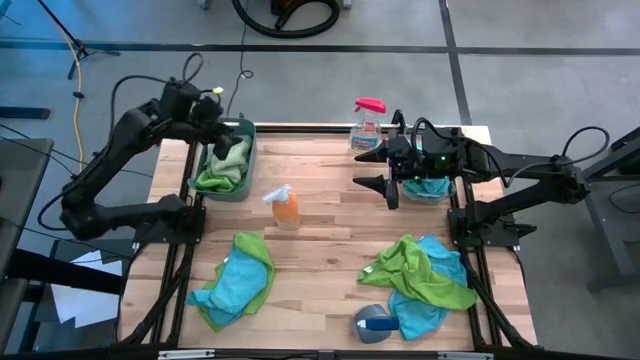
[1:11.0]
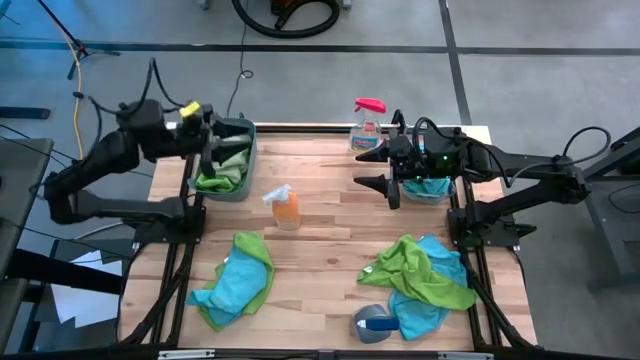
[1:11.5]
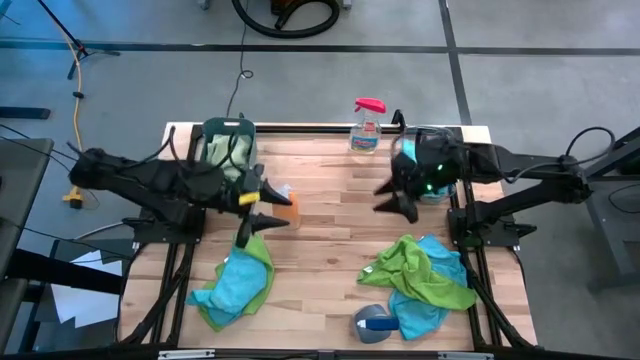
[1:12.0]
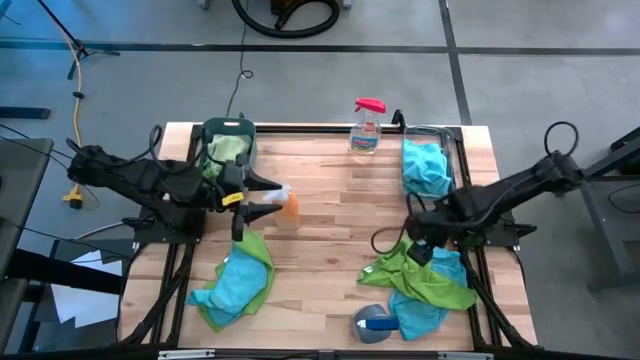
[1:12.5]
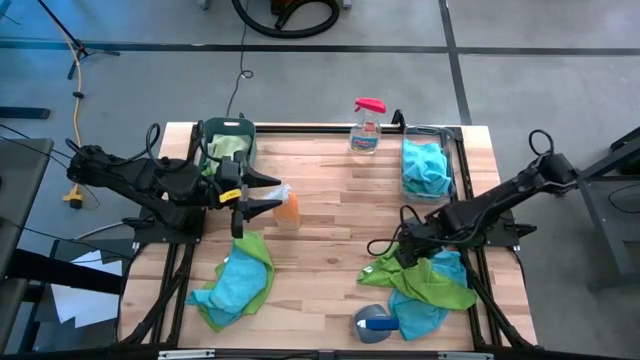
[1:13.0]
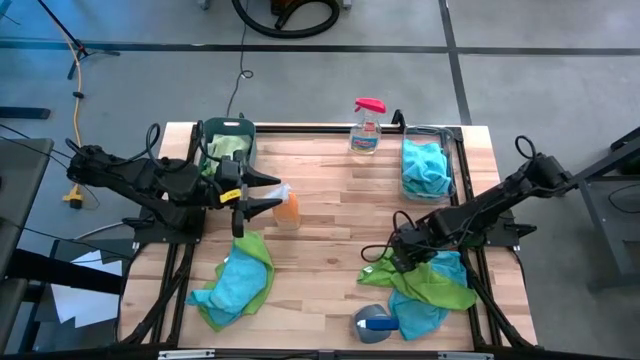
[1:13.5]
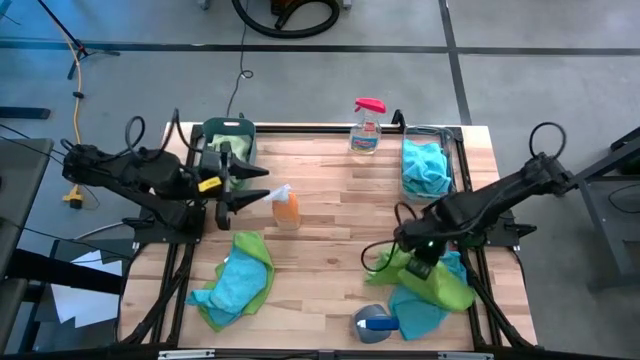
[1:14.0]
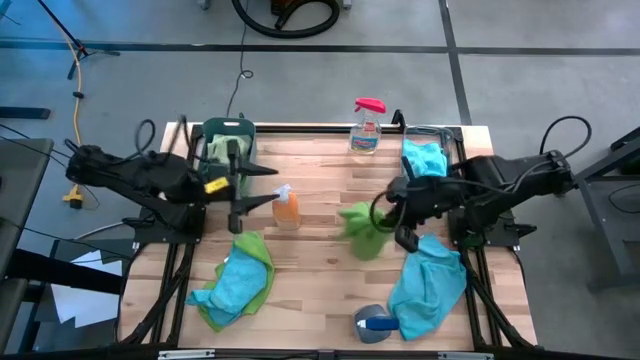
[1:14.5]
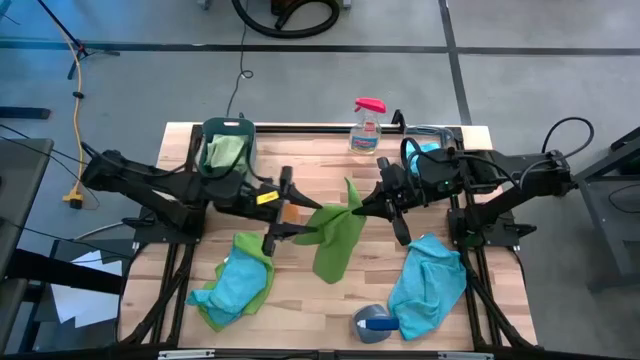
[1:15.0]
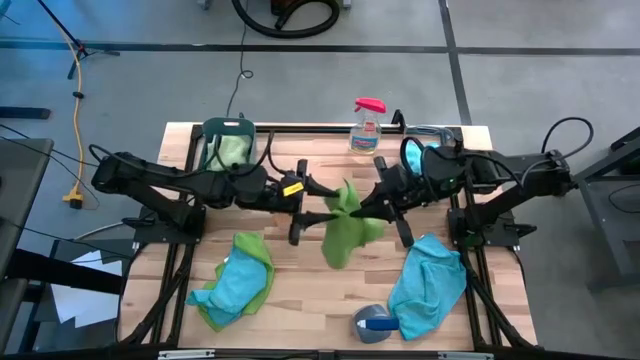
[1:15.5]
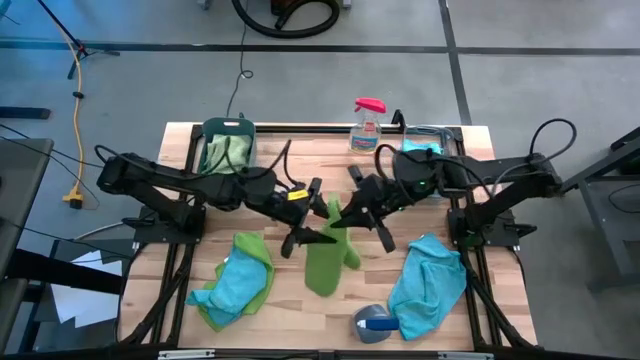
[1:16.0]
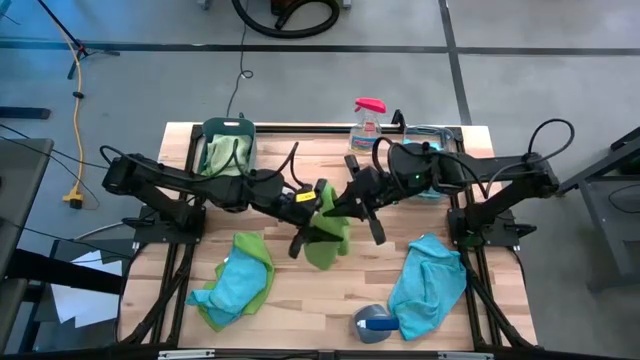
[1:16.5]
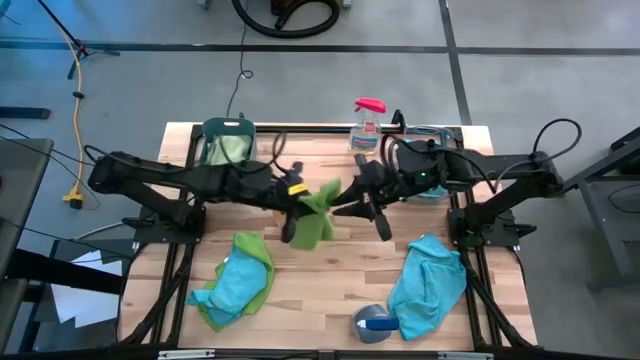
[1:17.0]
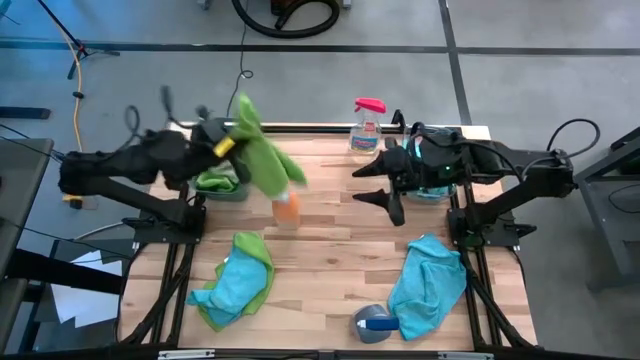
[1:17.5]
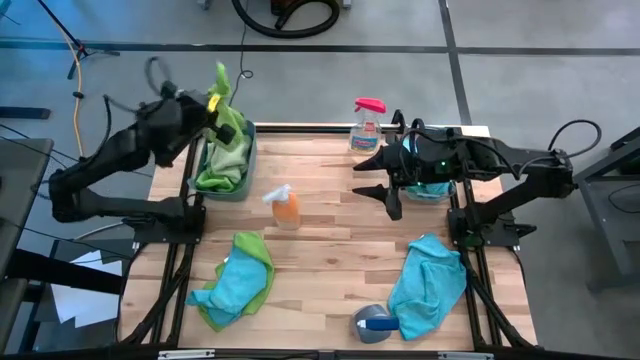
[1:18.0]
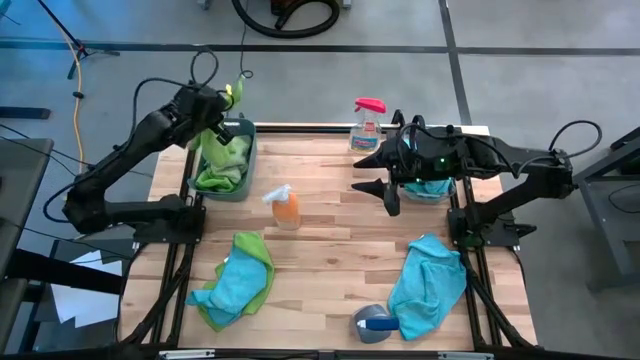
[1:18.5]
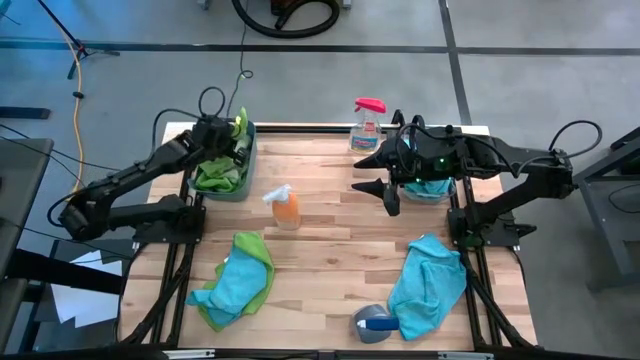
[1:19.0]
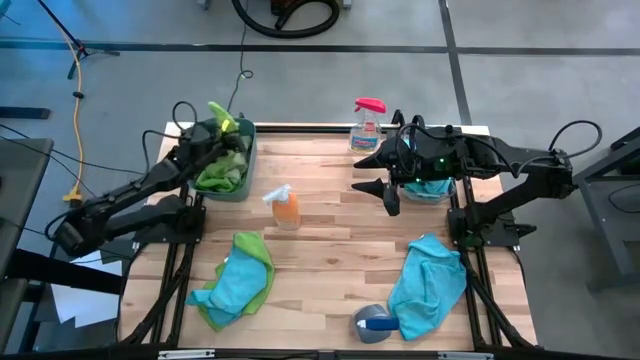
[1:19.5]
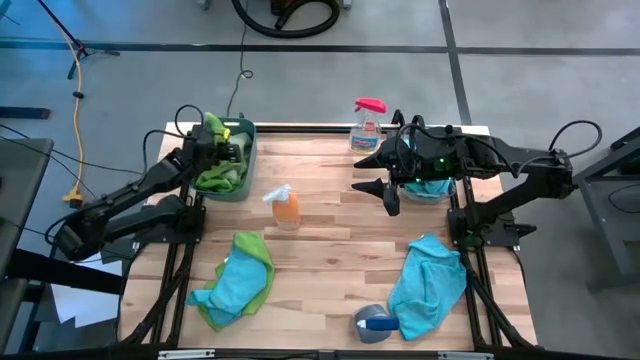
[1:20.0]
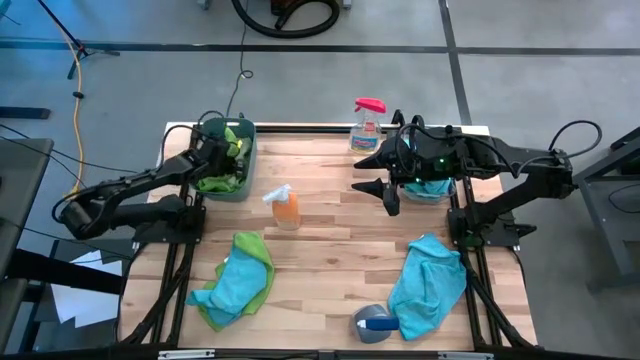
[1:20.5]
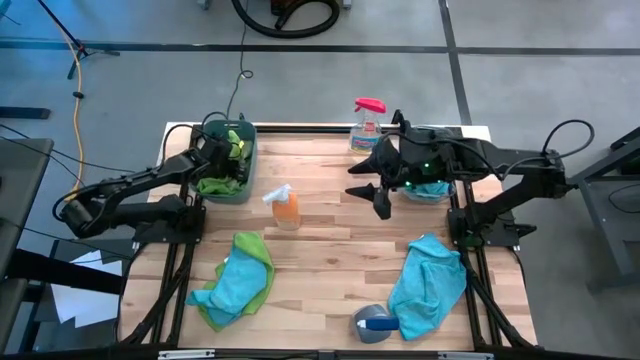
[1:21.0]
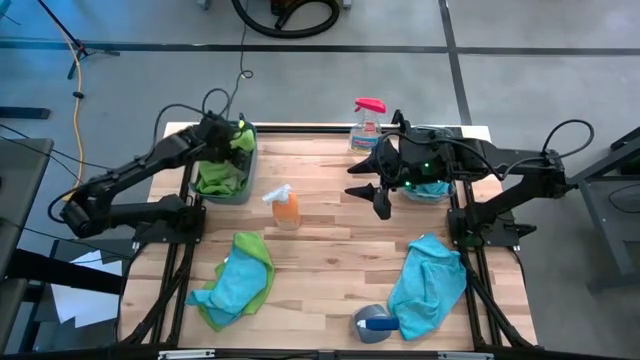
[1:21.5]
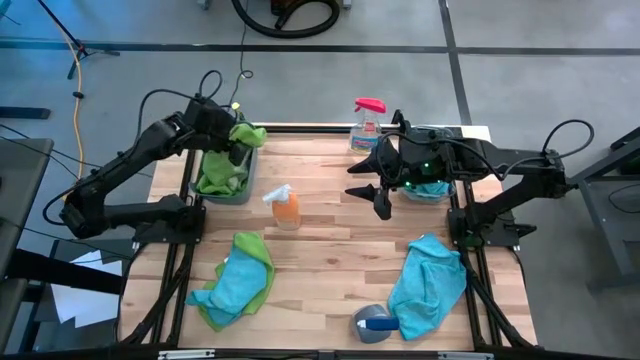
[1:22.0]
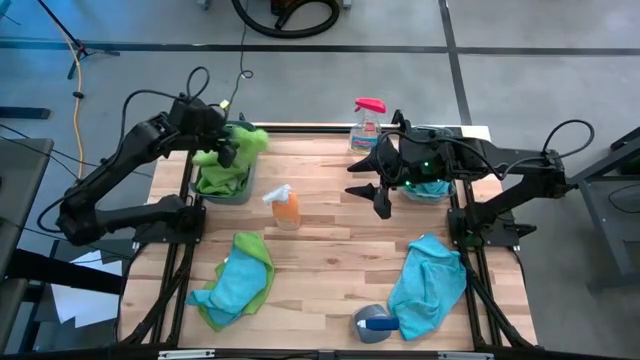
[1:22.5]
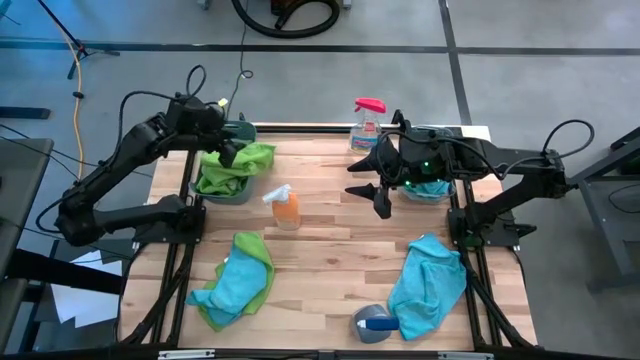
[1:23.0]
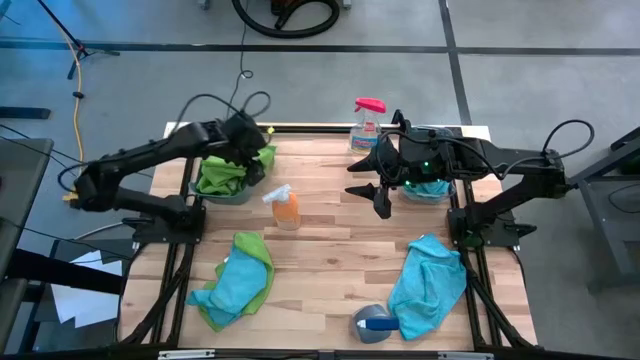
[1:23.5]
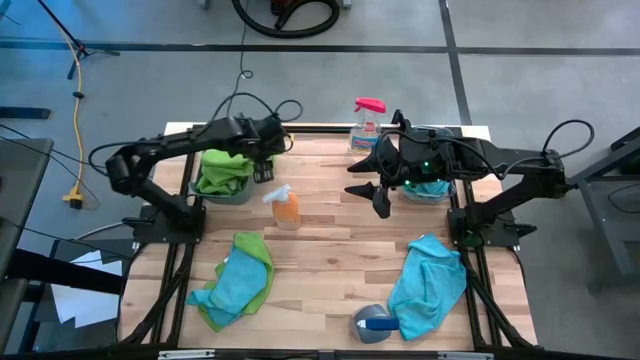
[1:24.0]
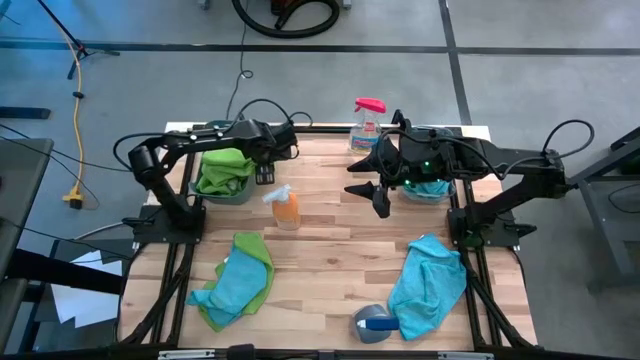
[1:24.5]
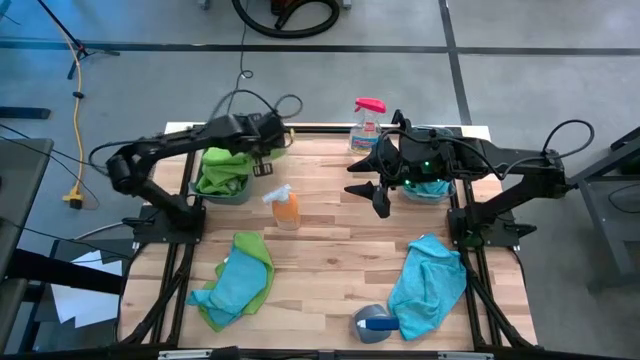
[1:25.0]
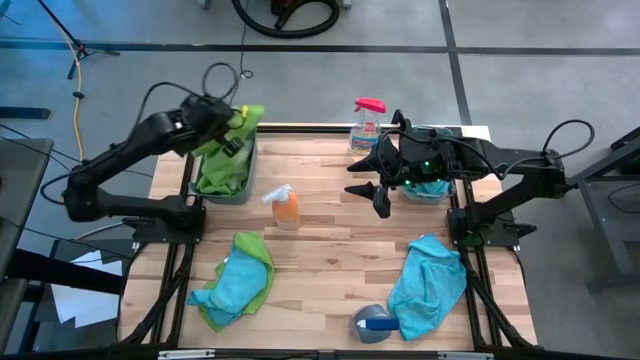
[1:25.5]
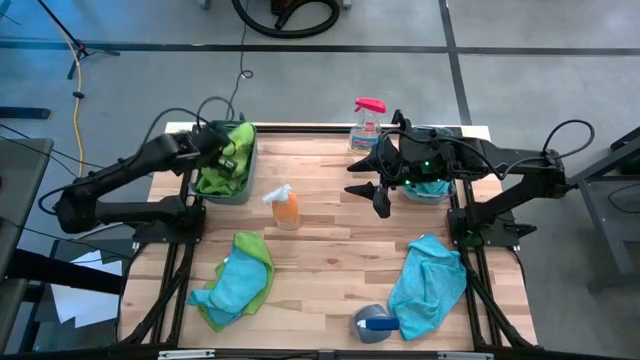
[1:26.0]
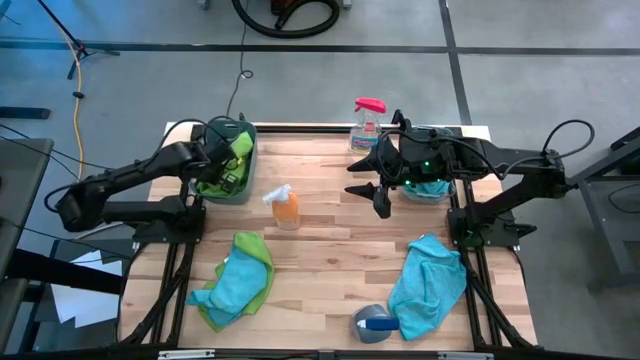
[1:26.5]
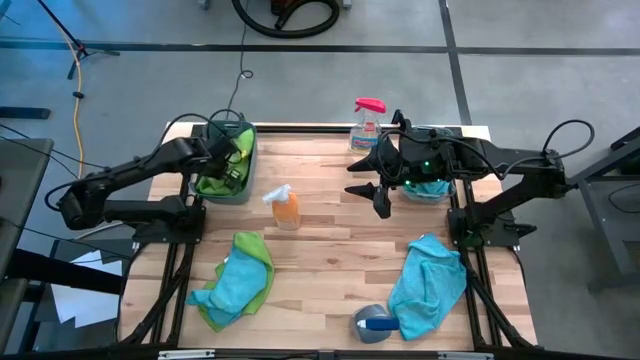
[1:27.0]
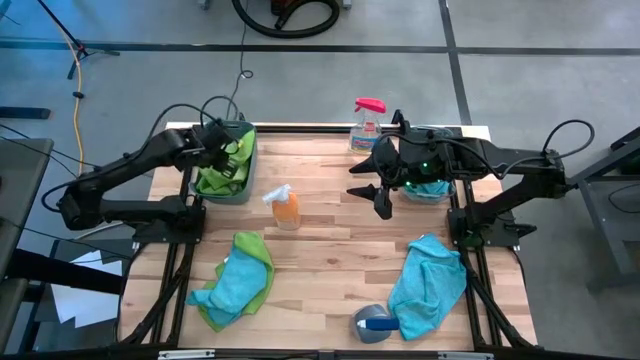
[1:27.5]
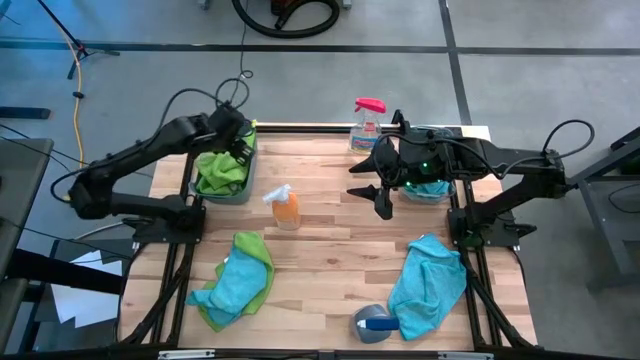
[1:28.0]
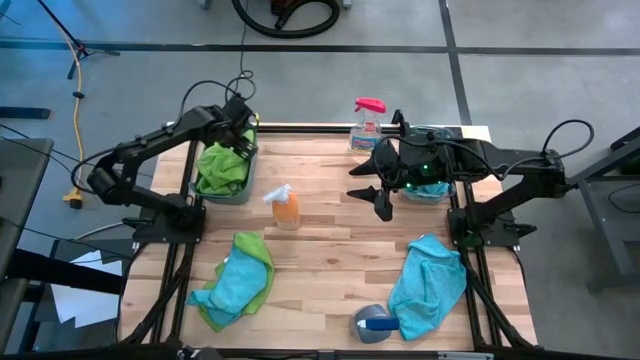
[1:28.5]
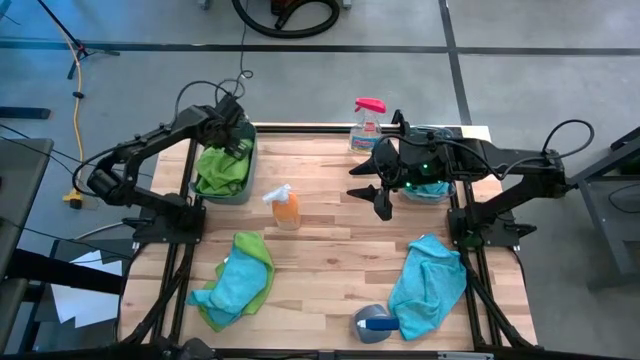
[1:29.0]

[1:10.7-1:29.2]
Task: Sort microfiber towel by color & place in baskets
Put the green microfiber towel into the green bin

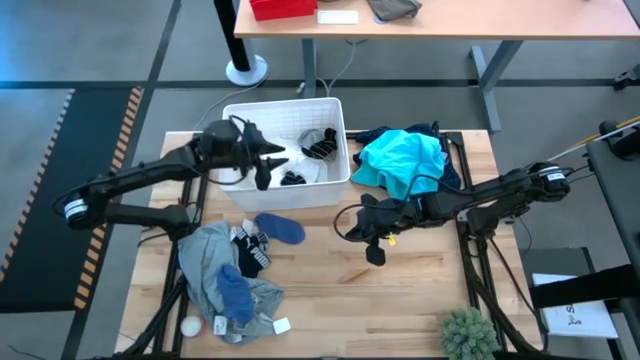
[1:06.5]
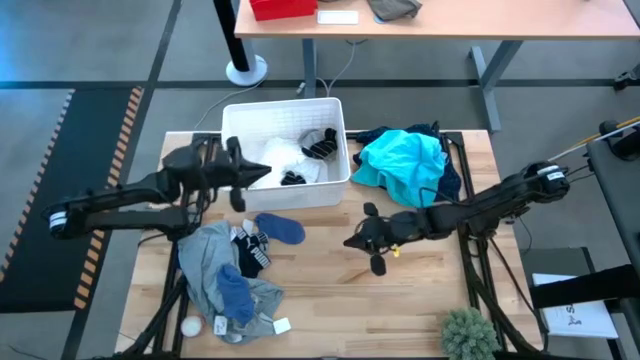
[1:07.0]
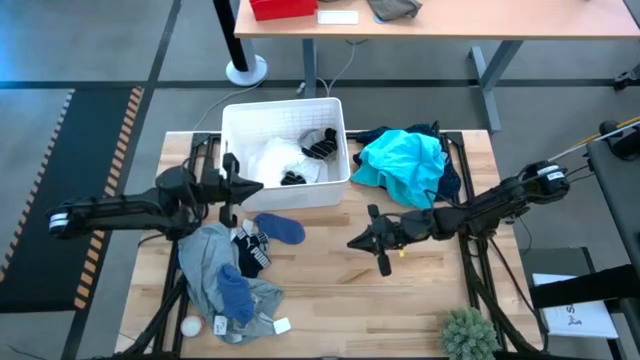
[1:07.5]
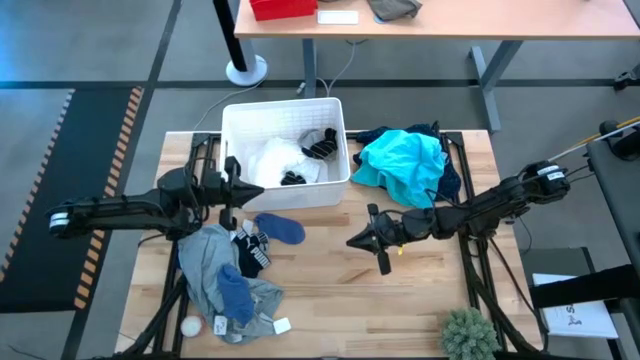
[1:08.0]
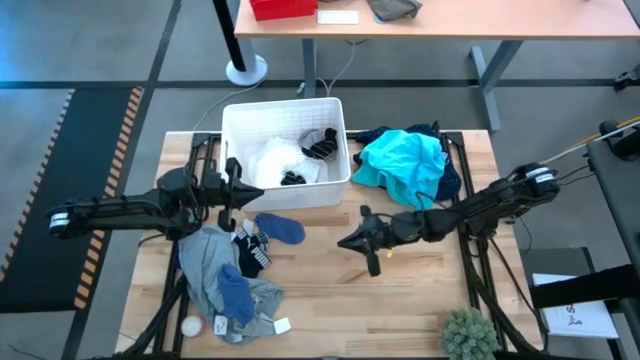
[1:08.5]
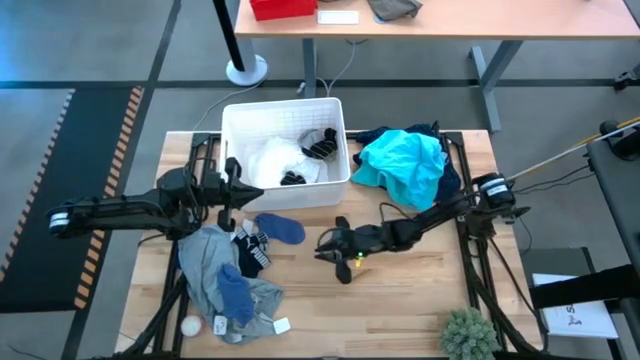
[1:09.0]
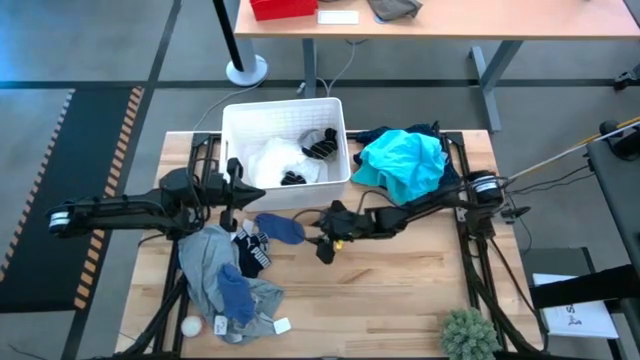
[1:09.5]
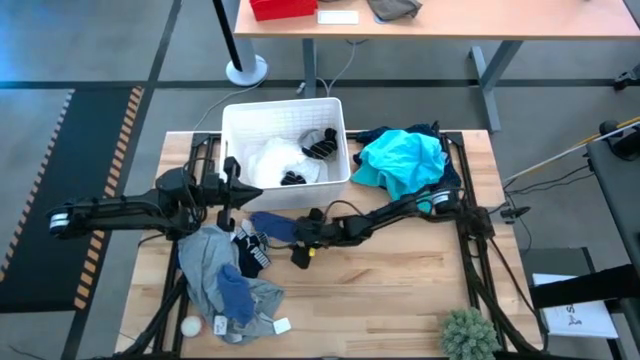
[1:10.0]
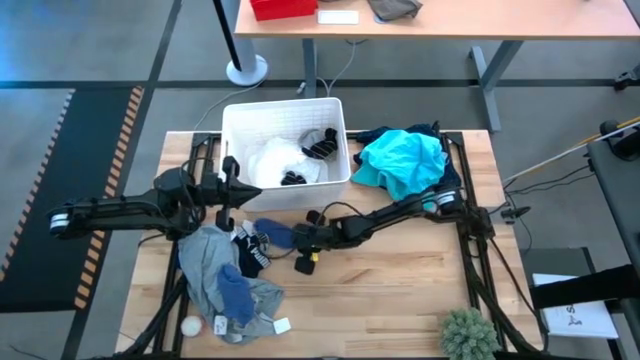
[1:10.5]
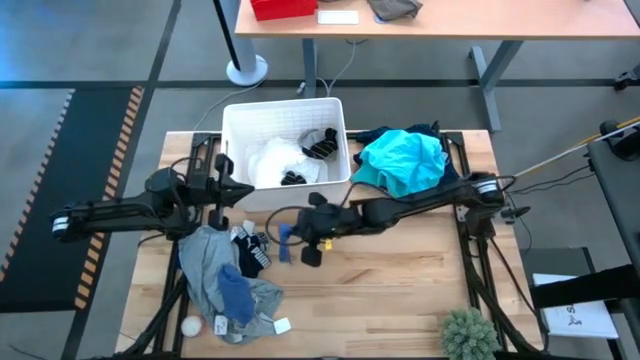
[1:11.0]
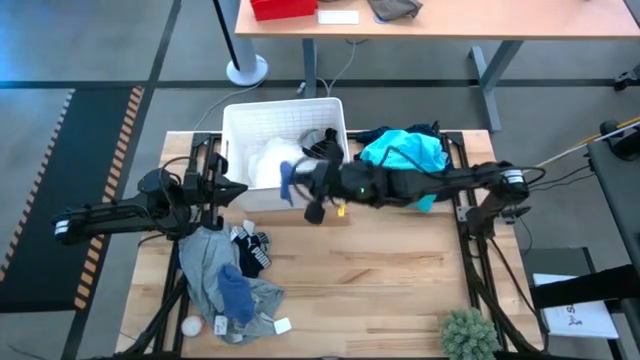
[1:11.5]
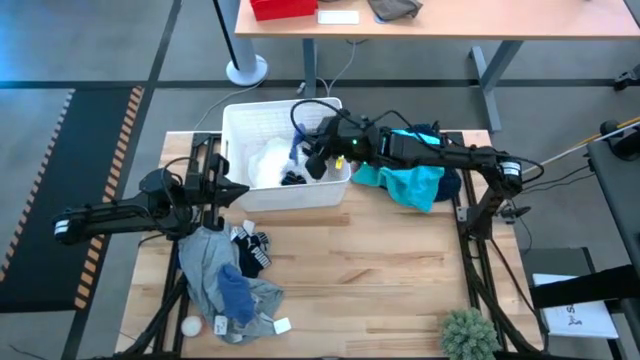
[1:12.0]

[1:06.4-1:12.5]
Task: Sort clothes
Put the top blue sock into the white bin
